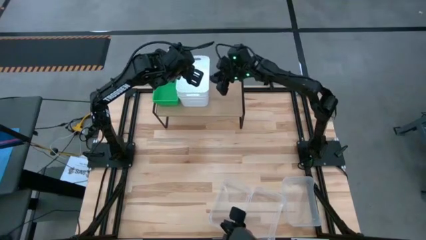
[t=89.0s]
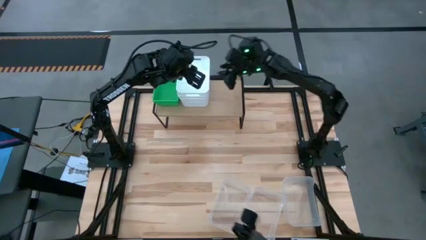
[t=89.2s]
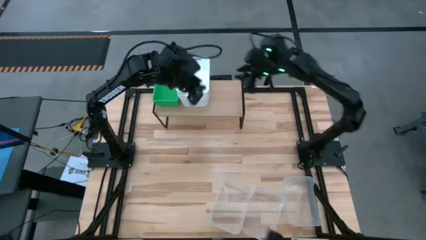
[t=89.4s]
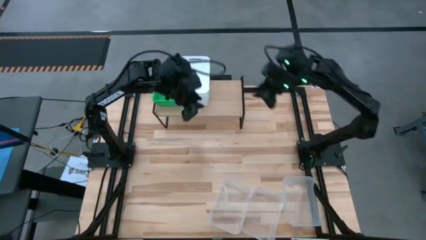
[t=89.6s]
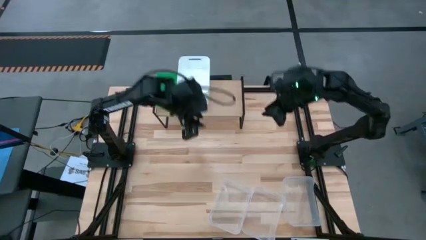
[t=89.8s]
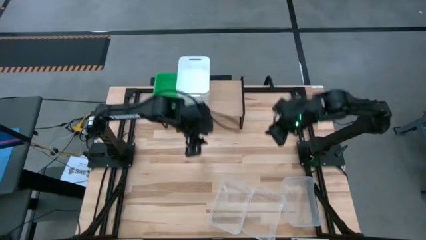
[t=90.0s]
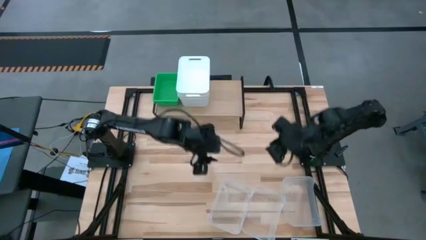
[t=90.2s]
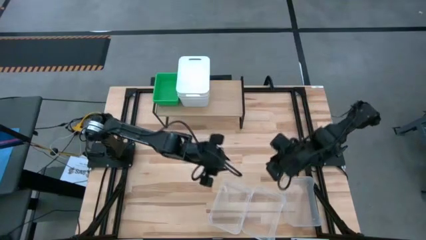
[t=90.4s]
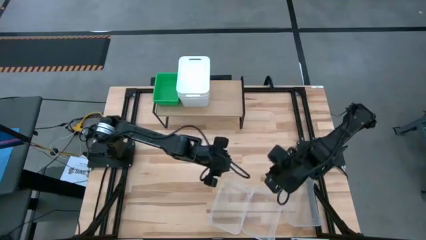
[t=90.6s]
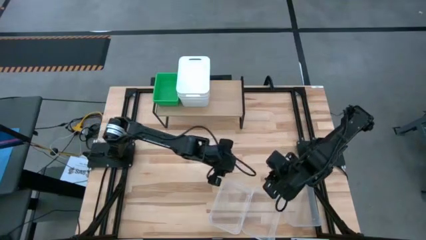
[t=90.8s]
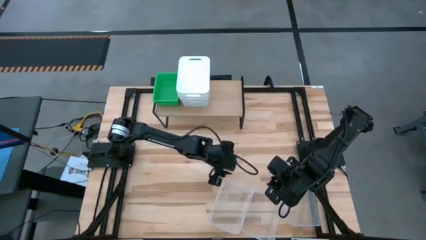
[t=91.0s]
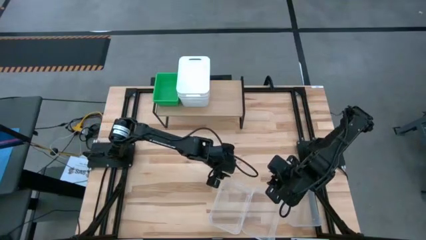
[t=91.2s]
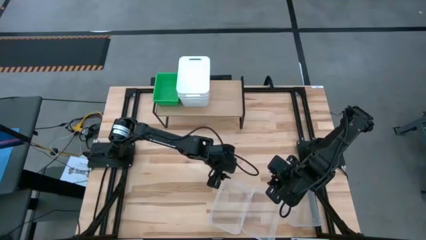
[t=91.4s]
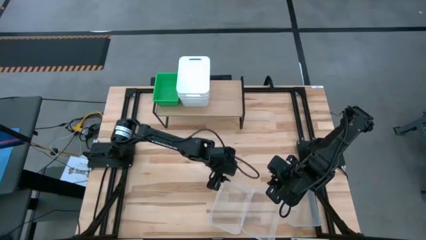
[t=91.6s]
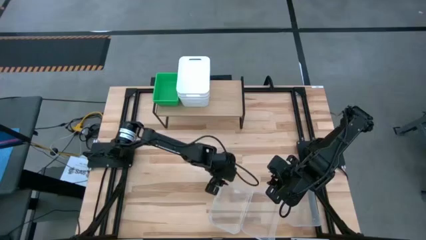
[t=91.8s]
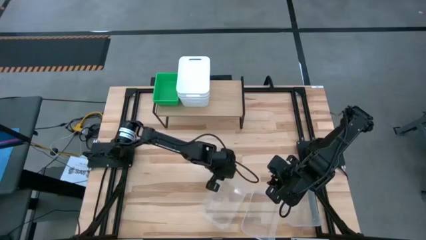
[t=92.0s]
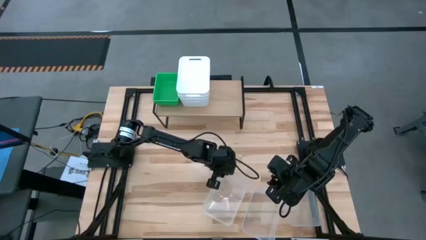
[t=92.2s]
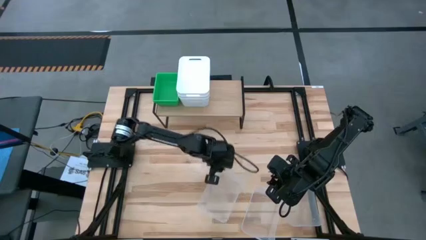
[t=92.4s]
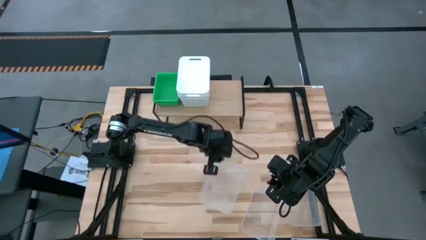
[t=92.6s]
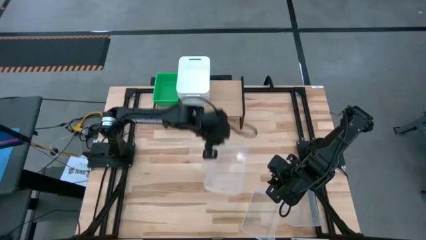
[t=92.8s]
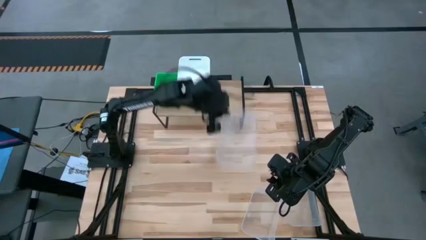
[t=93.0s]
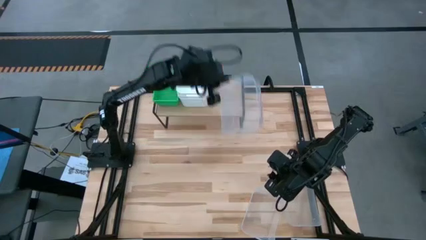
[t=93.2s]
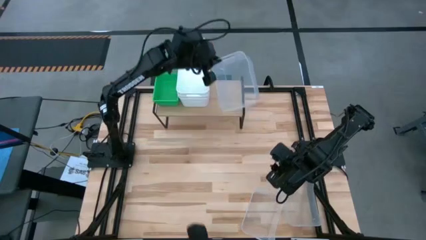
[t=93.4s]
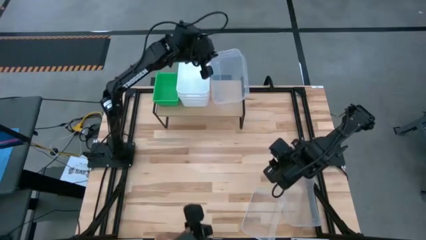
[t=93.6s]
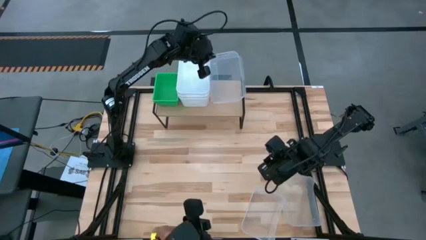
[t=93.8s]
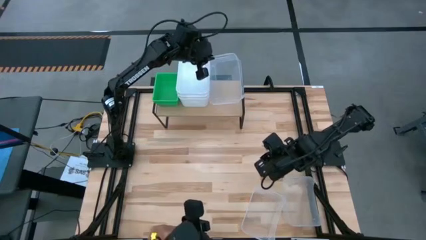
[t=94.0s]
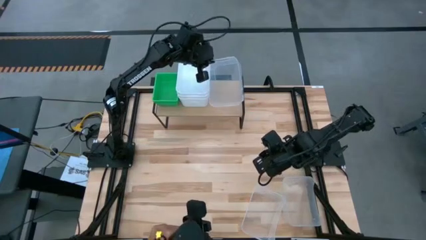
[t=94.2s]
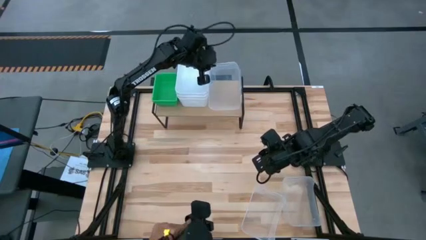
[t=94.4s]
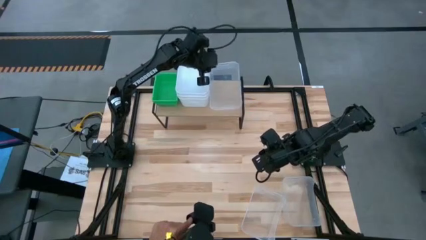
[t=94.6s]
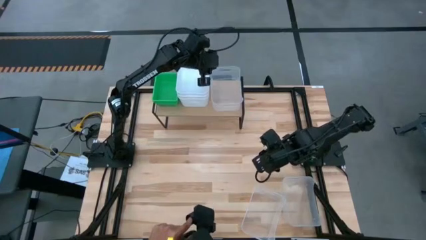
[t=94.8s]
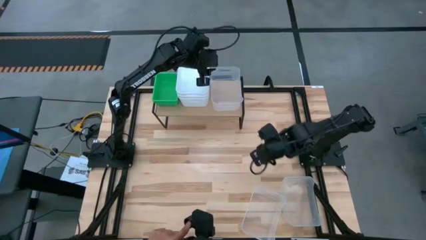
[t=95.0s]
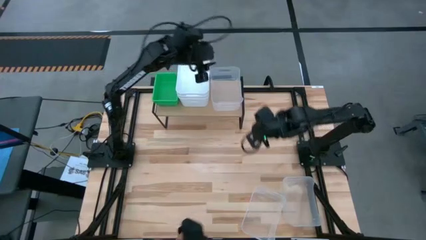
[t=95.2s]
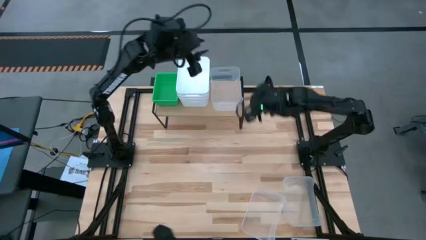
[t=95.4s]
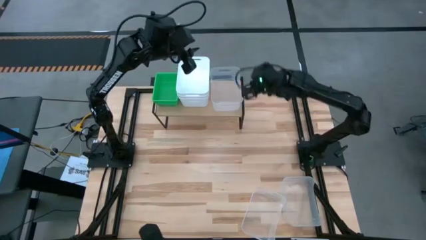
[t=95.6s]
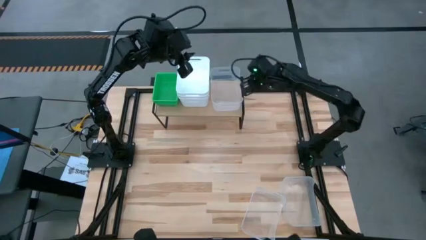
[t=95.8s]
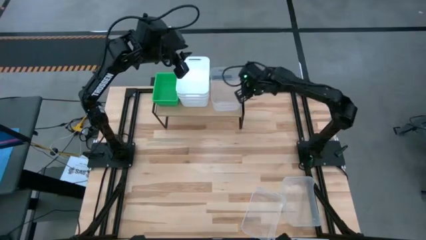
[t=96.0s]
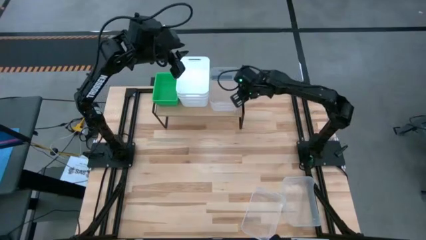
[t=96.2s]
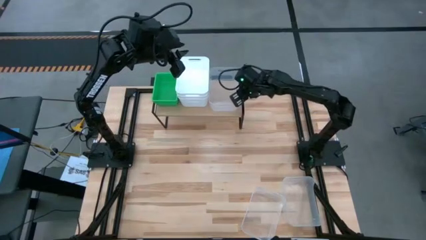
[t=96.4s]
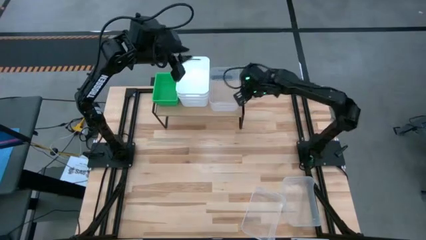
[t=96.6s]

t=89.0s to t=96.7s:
Task: Stack baskets on shelf by color
Put the left transparent bin on the shelf

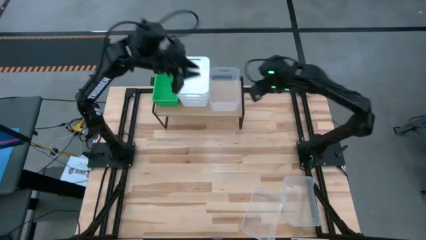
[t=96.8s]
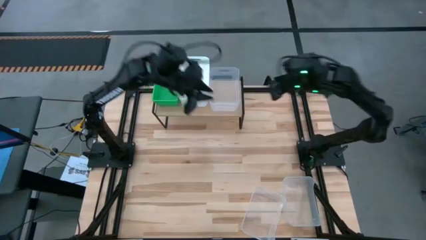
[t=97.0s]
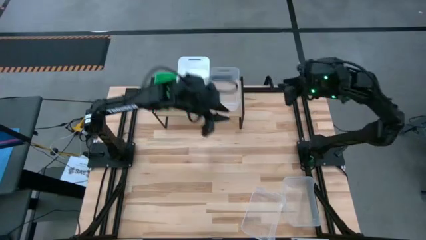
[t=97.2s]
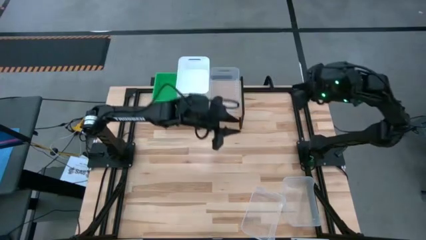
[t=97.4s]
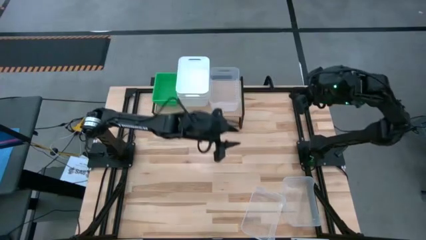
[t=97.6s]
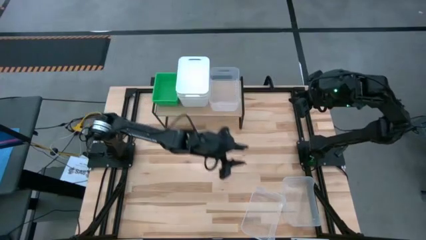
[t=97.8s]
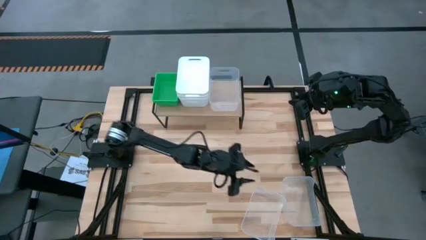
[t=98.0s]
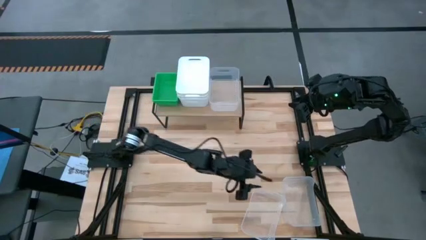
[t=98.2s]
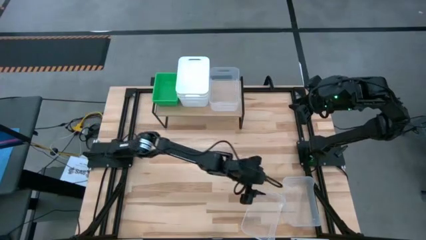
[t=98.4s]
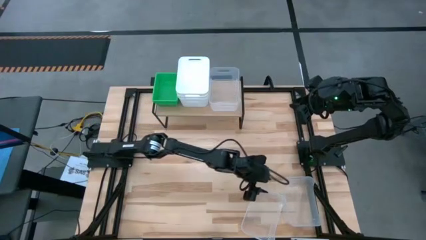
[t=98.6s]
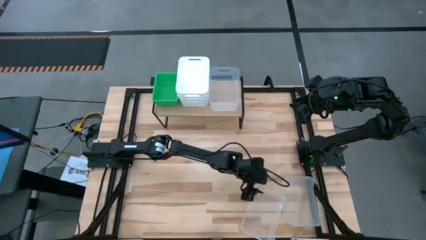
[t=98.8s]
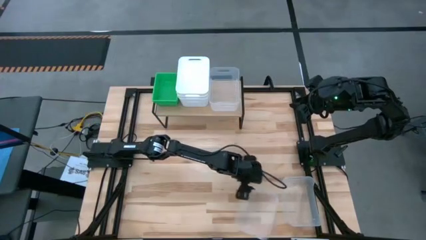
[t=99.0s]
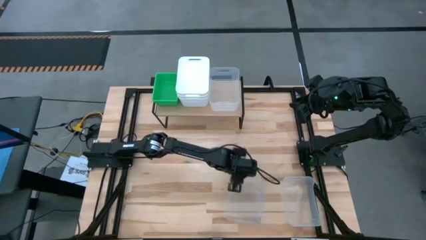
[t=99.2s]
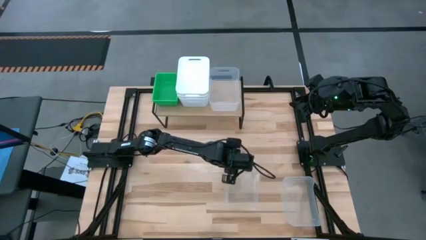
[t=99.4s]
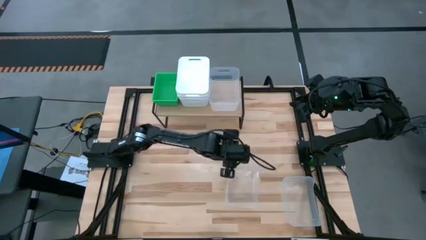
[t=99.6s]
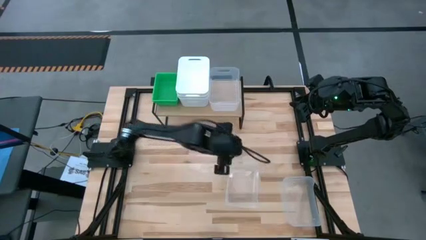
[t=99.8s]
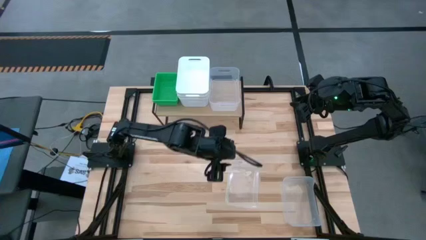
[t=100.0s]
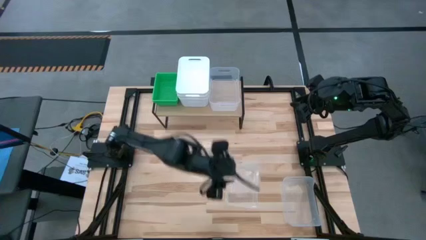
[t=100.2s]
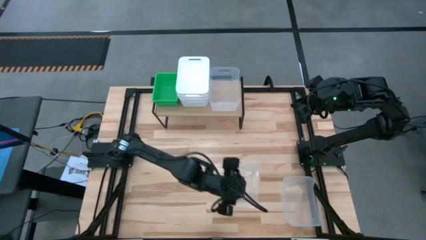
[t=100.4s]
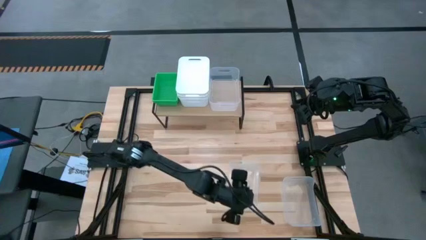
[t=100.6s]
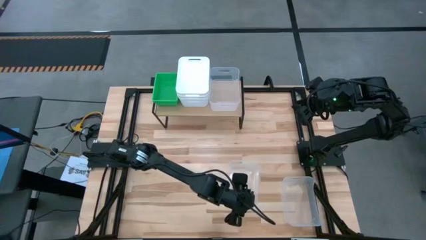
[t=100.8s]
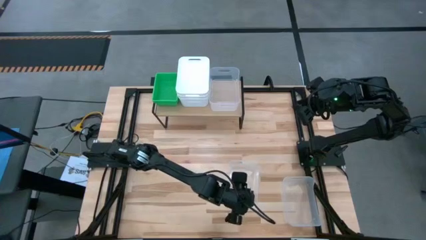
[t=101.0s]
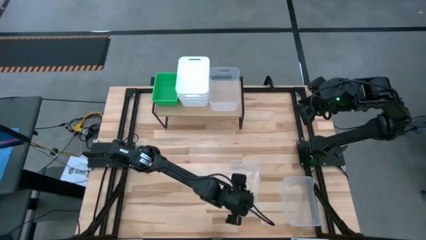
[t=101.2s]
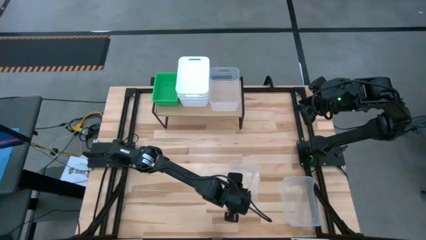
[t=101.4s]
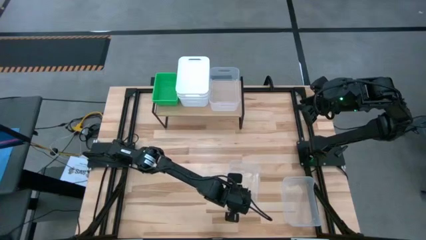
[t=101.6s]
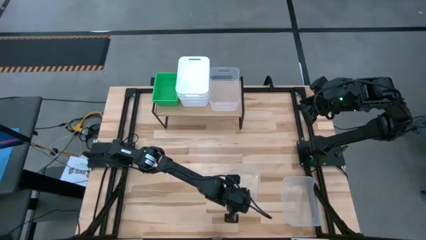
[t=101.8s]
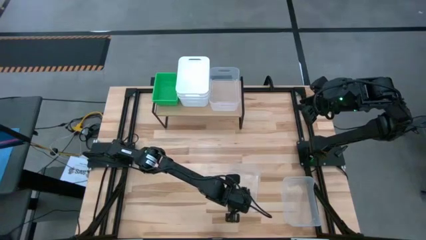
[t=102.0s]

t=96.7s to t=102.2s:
Stack the left transparent bin on top of the transparent bin on the shelf

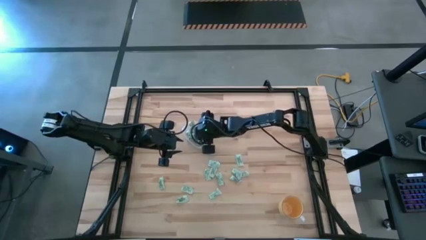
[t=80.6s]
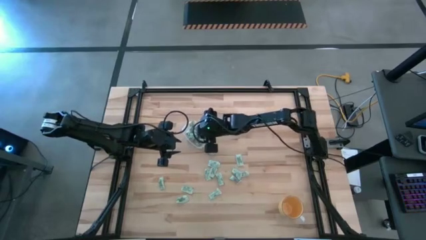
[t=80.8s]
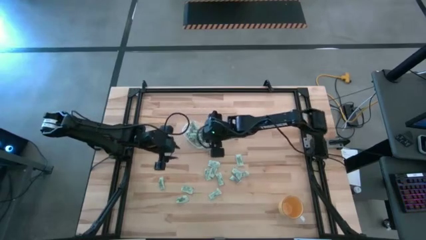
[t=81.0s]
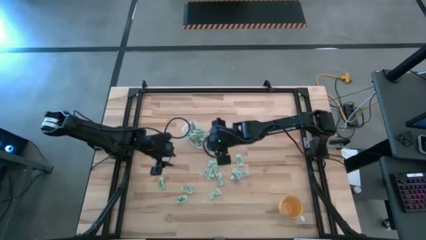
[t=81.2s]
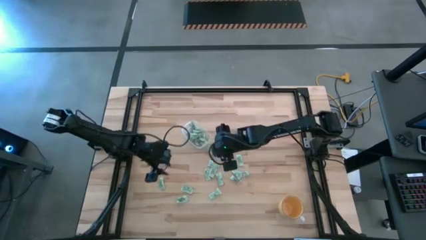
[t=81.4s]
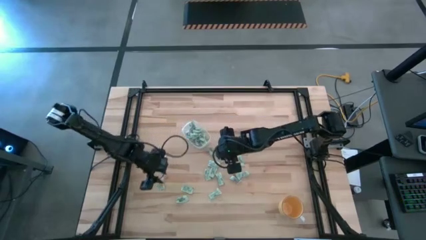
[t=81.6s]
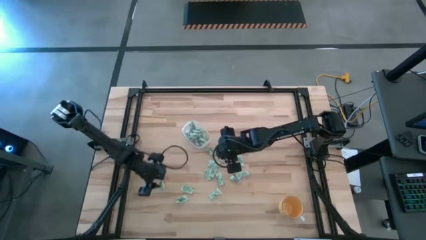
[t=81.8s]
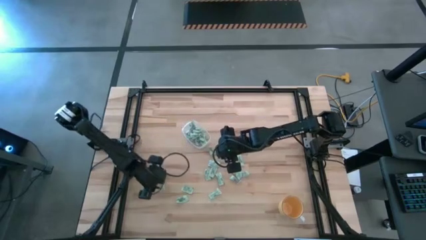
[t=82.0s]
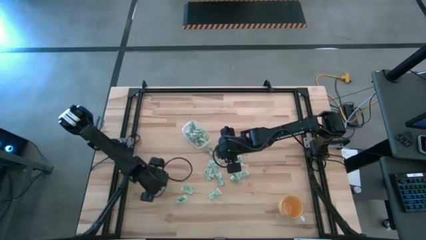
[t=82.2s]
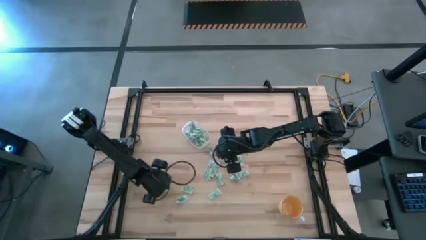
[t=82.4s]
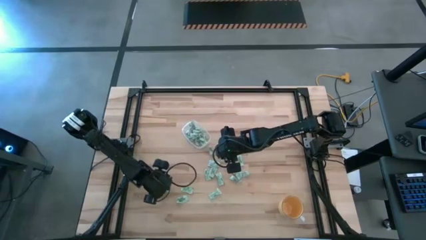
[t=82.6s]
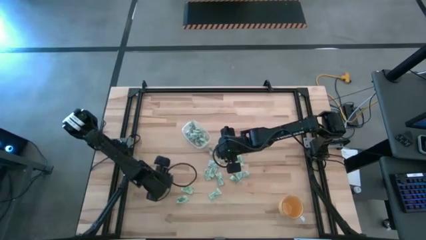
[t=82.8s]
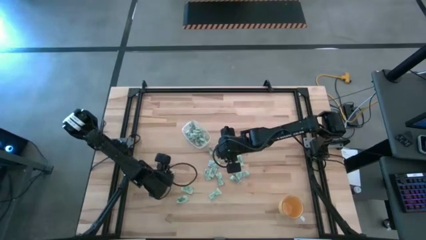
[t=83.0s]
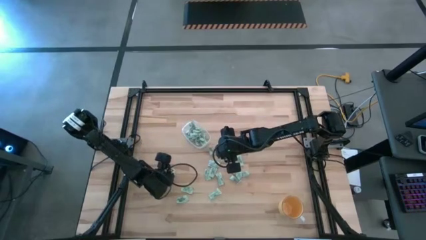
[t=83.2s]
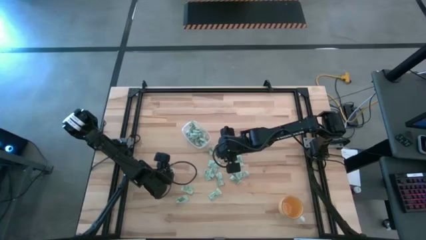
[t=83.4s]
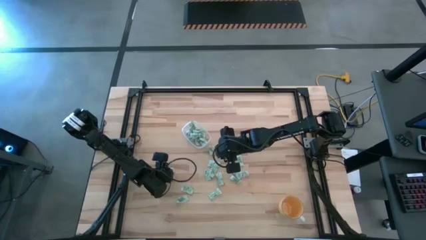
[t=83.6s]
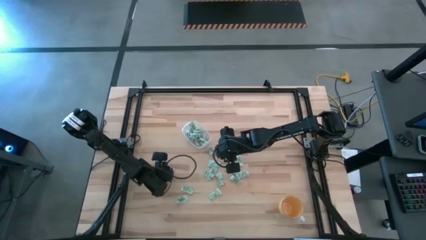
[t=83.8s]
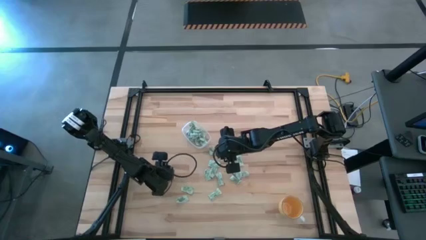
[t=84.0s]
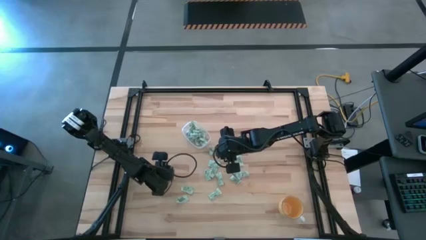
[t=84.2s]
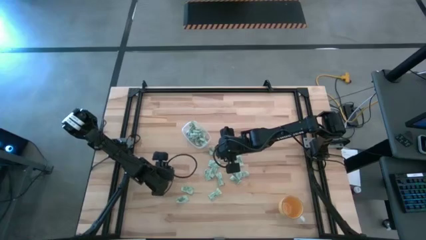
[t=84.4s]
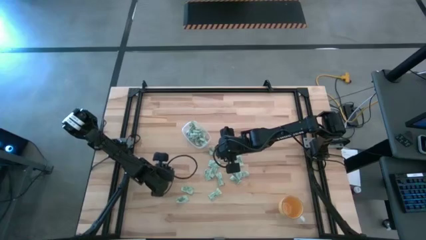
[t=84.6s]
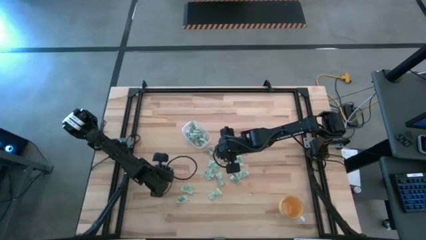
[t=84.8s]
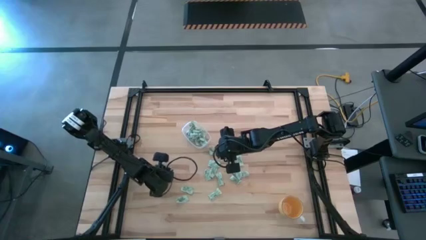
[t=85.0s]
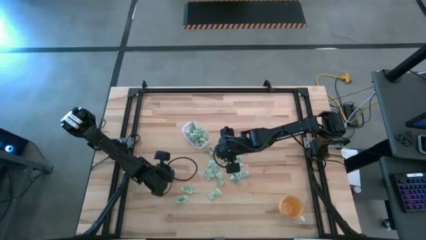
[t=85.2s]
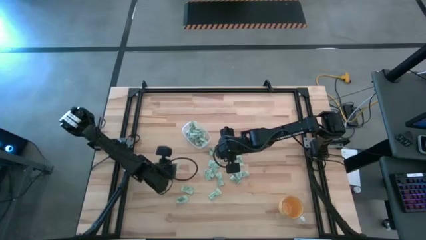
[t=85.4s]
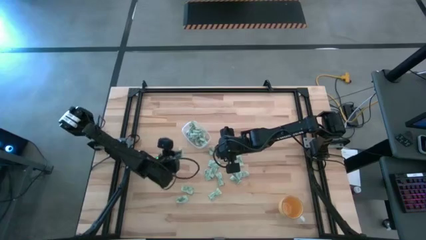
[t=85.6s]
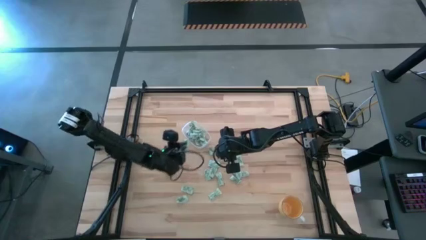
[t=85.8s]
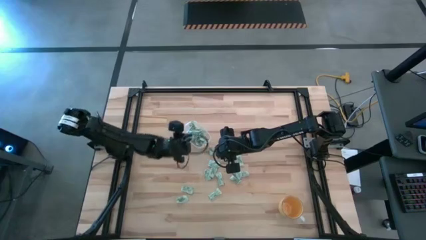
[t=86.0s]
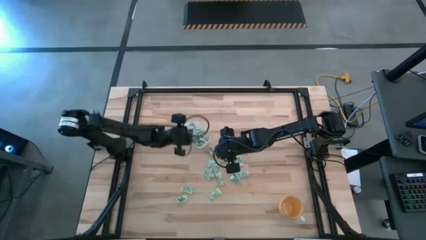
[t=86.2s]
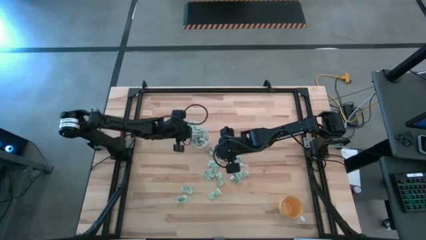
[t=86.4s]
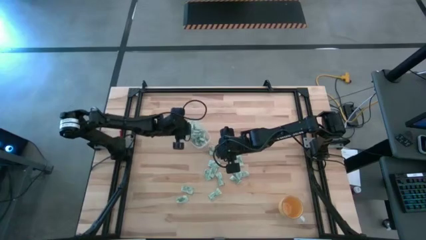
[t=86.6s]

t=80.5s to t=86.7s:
Task: Pick and place Stevia / Truvia into bins
Put the stevia packet into the transparent bin
